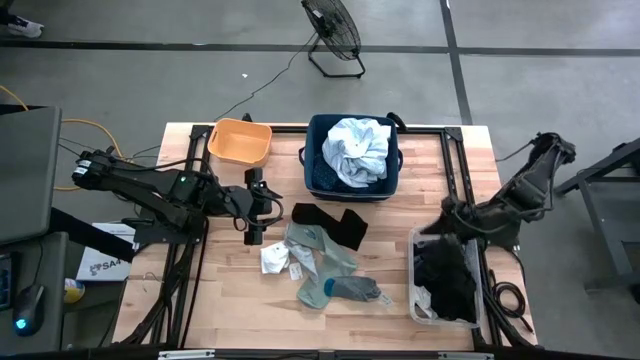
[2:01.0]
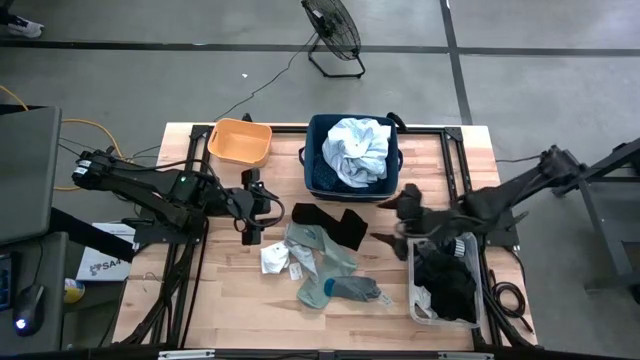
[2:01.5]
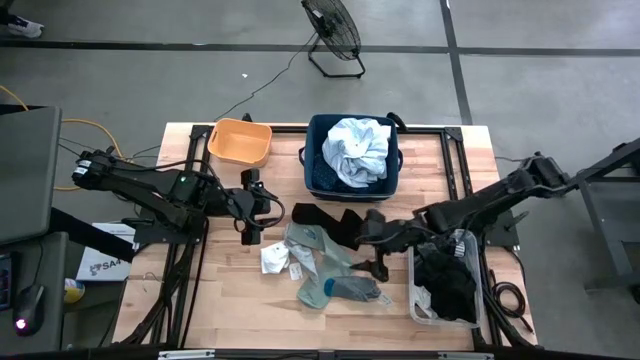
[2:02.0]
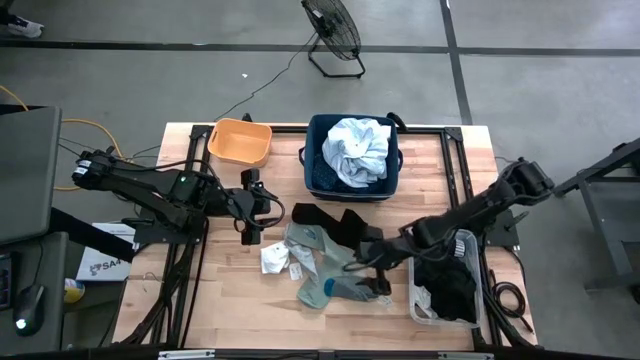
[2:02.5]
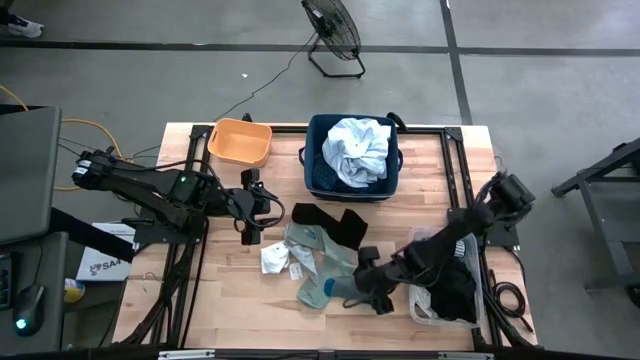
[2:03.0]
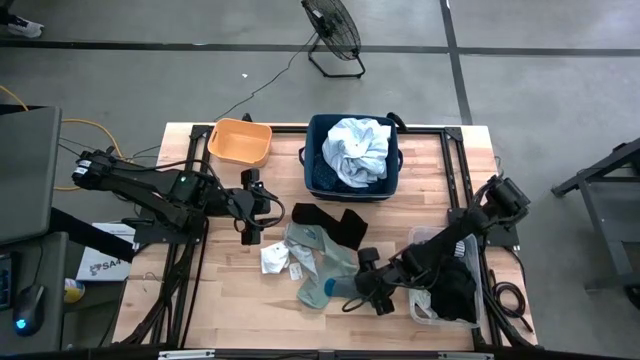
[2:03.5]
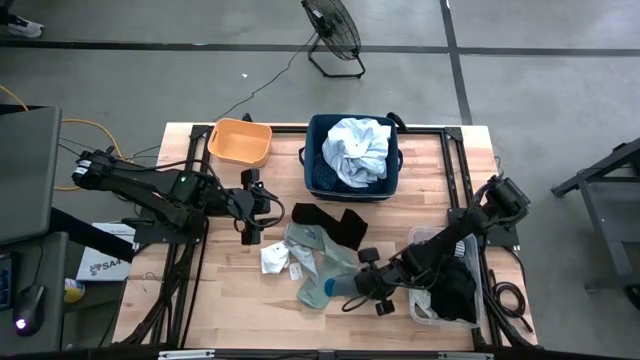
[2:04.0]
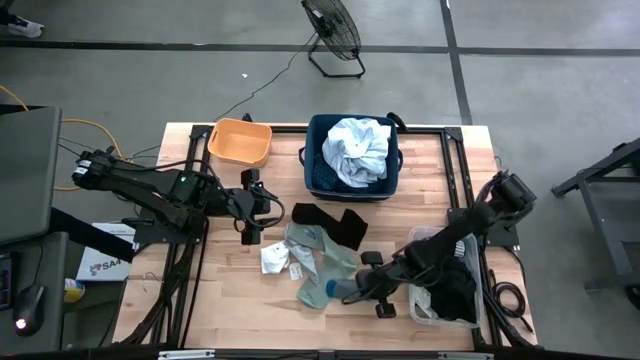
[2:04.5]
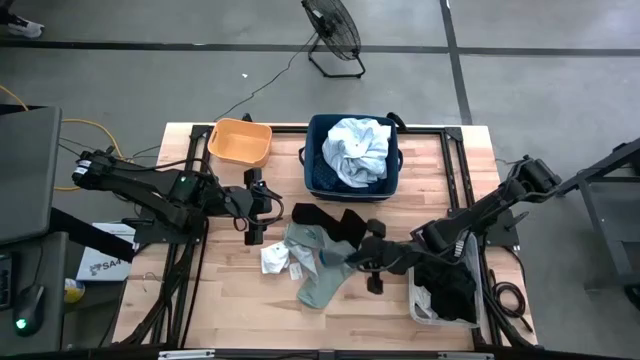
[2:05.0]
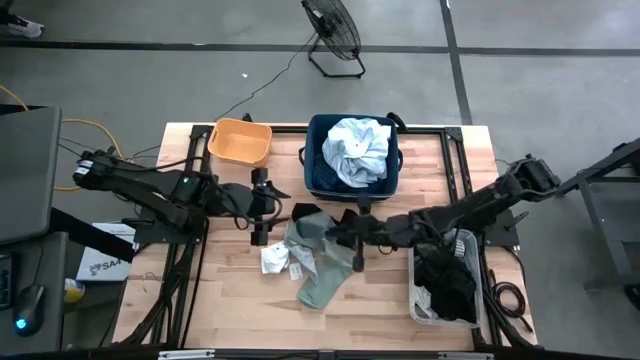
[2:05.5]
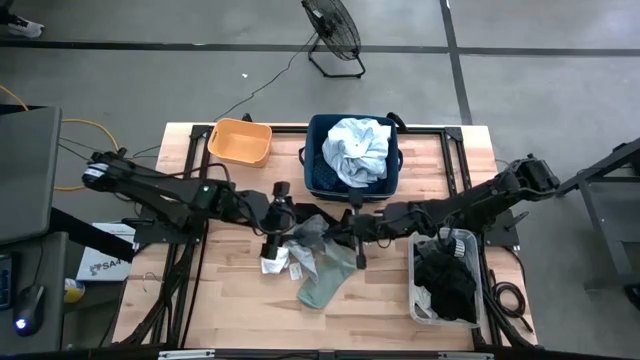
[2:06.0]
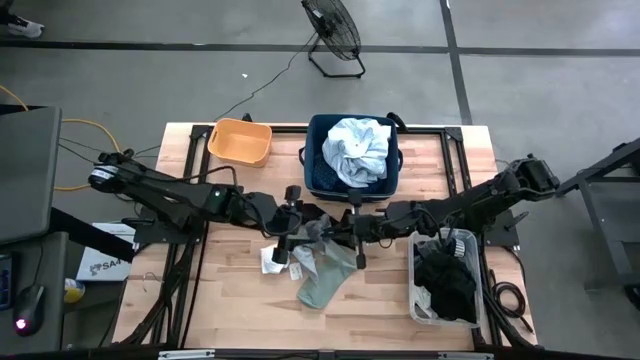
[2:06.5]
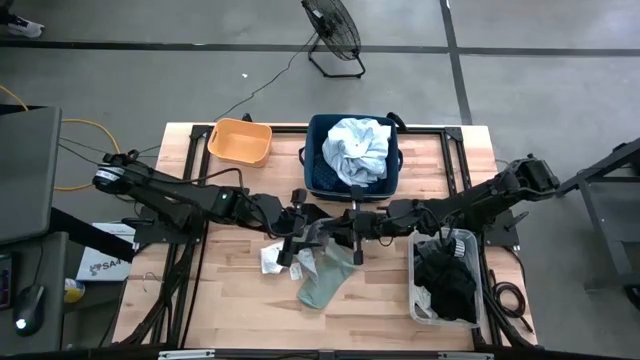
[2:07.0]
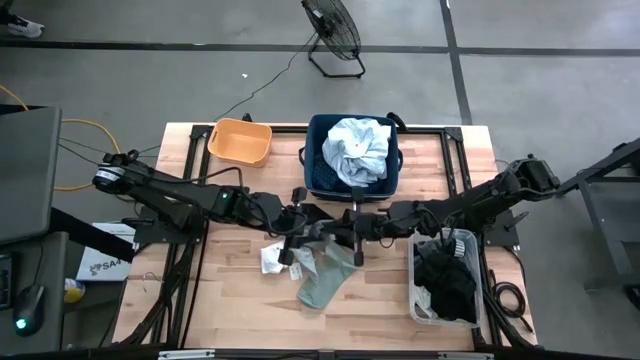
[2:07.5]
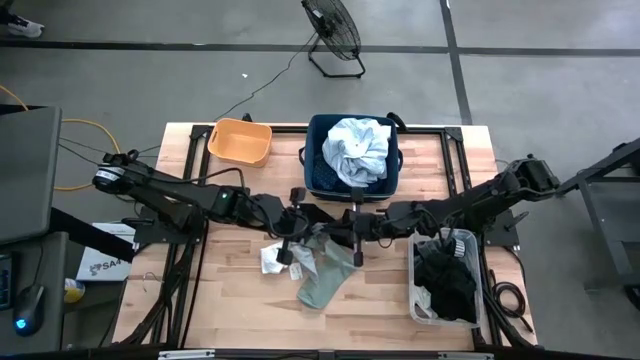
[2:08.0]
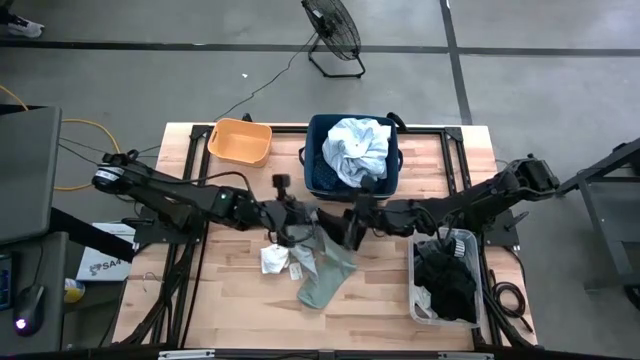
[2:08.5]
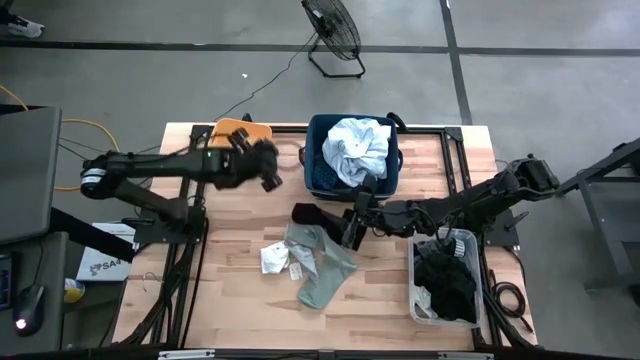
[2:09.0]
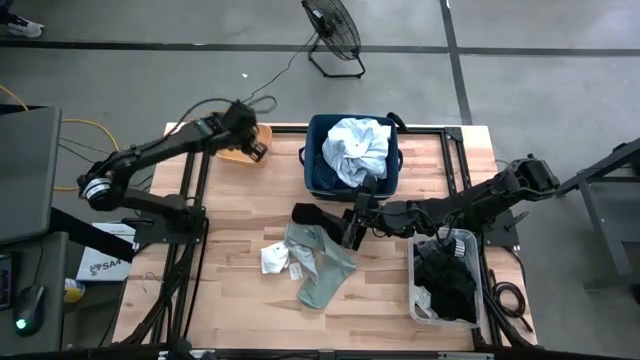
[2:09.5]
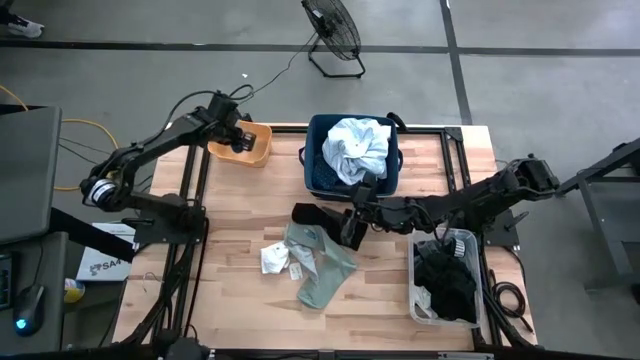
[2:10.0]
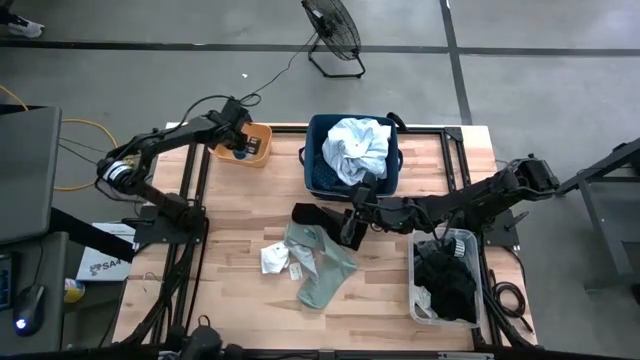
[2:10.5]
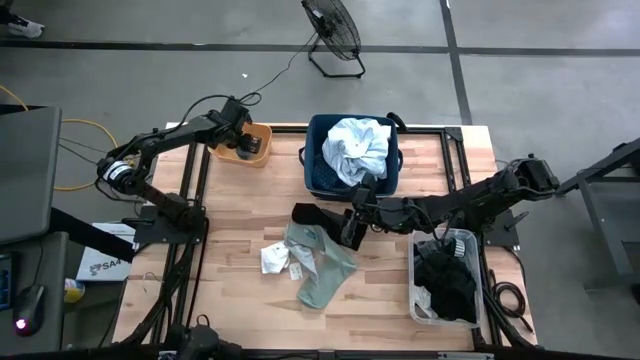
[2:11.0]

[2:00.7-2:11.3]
Task: Pick & Place Cloths
Put the gray sock into the yellow bin

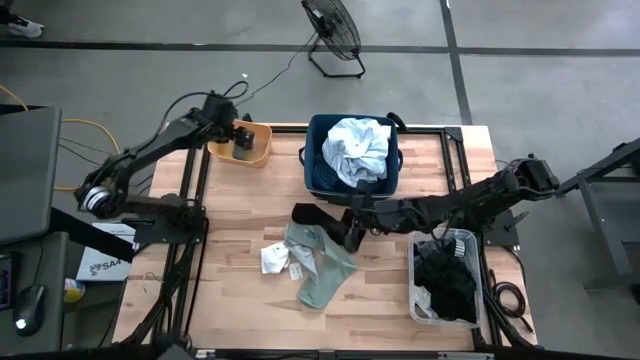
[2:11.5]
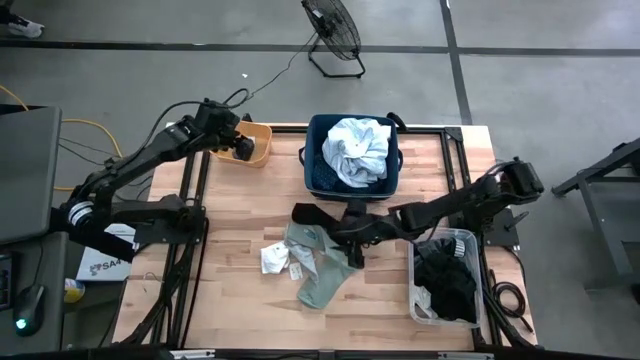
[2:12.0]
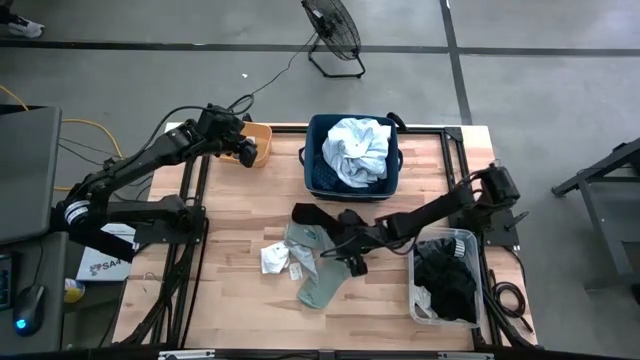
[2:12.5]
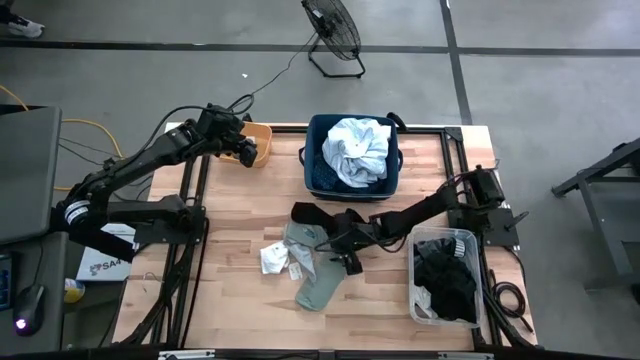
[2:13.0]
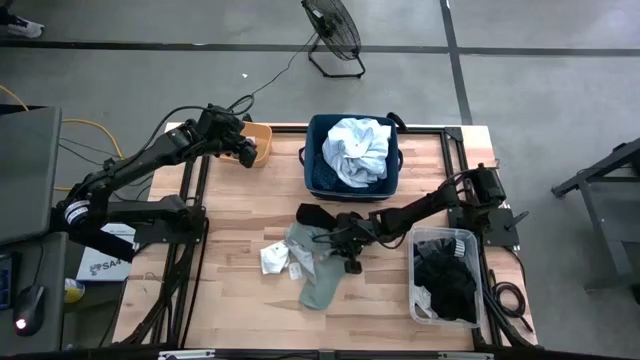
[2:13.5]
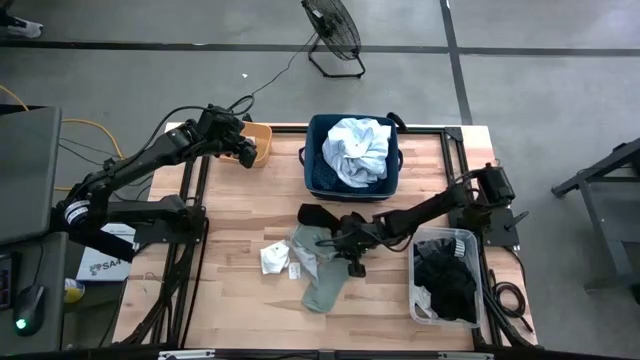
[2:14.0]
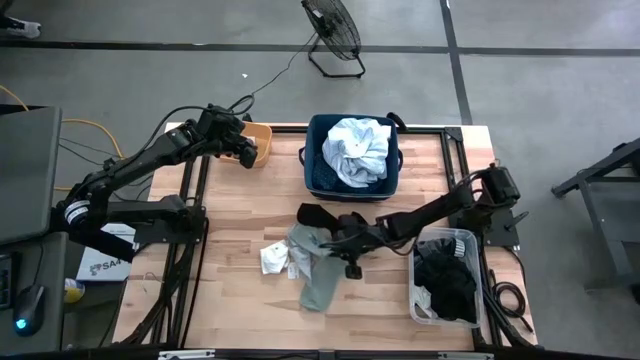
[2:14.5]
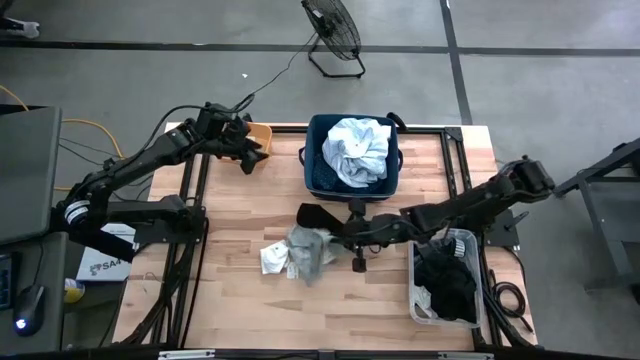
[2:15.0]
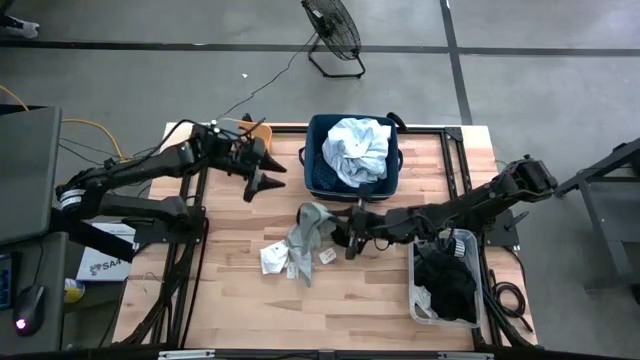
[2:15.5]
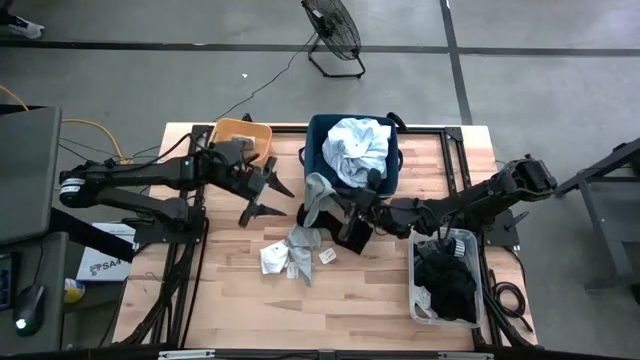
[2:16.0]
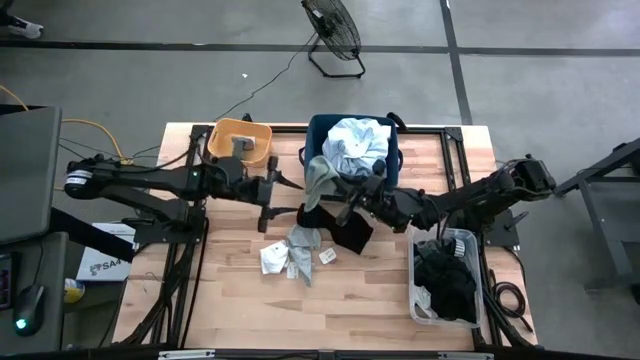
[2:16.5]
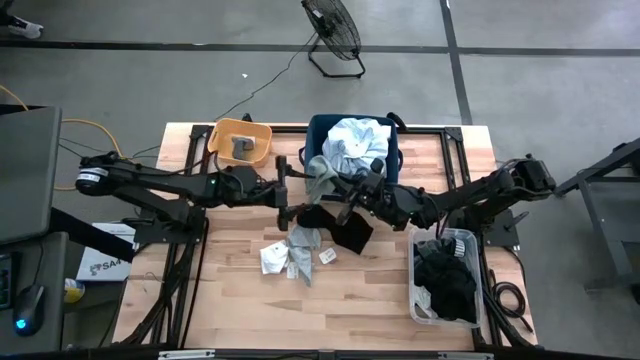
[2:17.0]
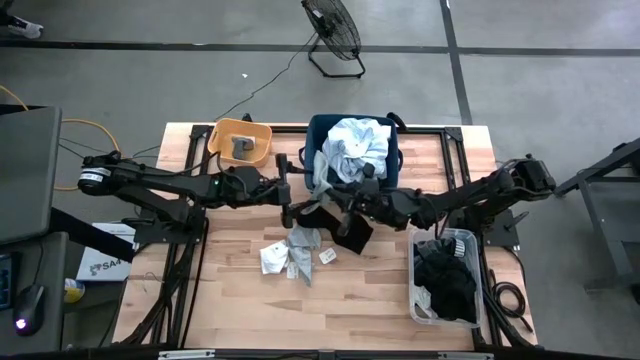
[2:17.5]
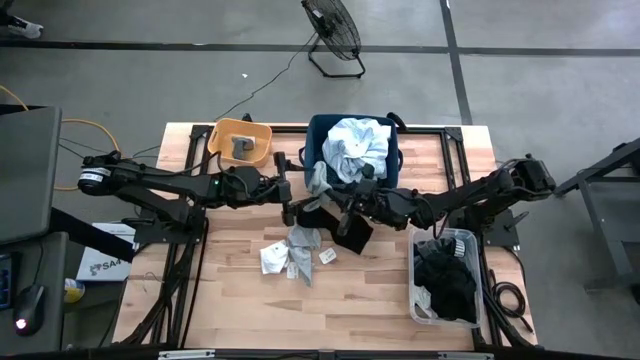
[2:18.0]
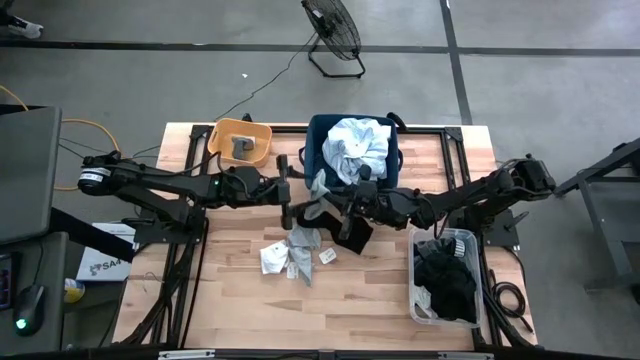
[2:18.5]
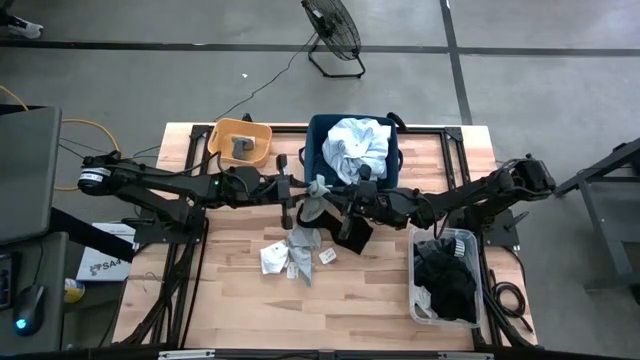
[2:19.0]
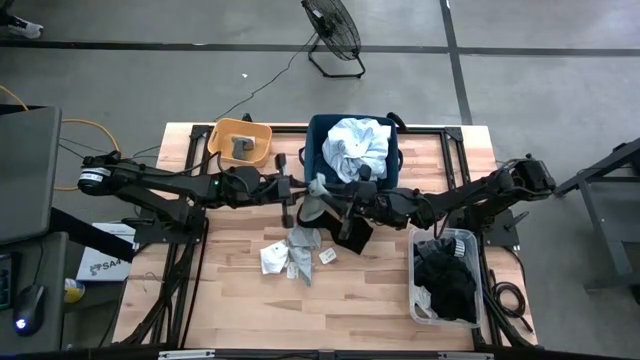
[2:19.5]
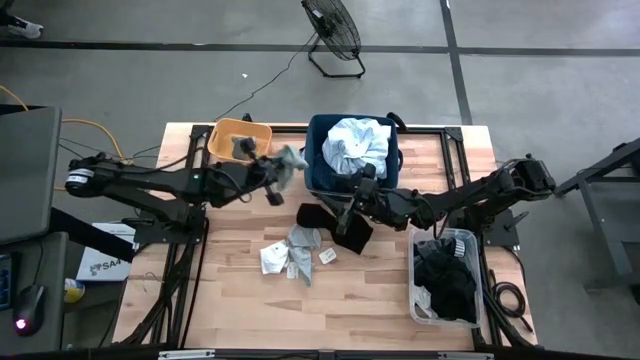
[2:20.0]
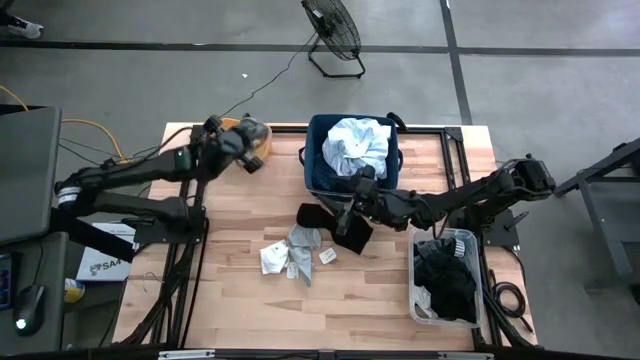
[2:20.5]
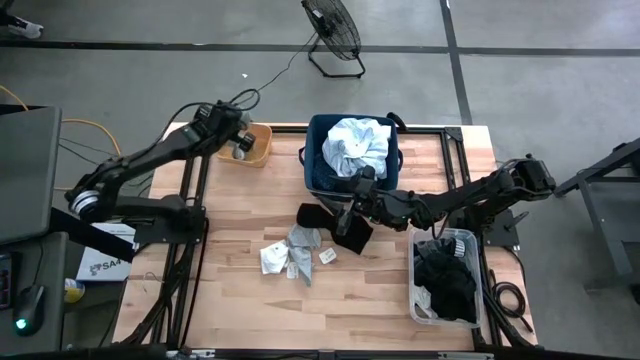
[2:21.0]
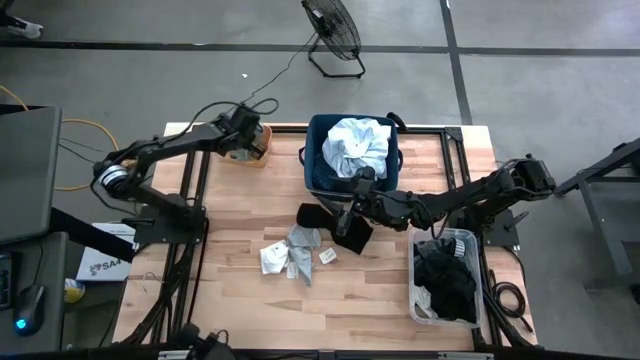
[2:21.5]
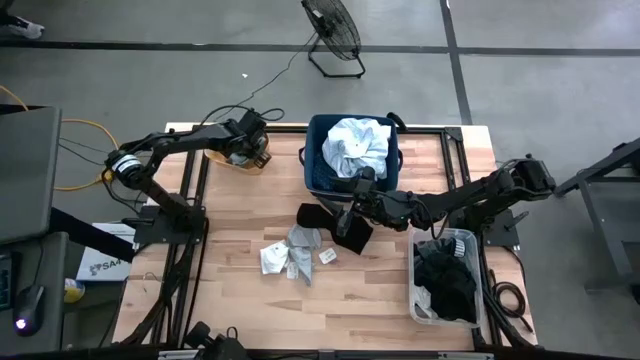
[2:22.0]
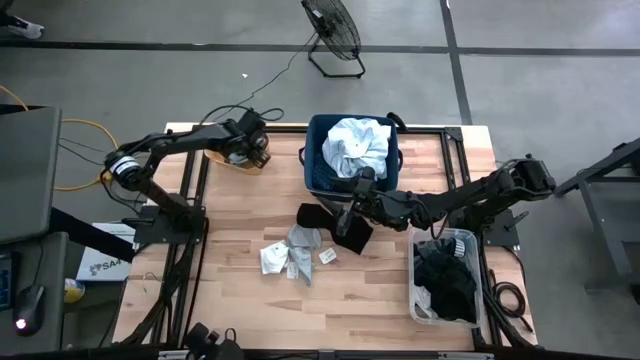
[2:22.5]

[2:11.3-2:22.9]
Put the gray sock into the yellow bin
